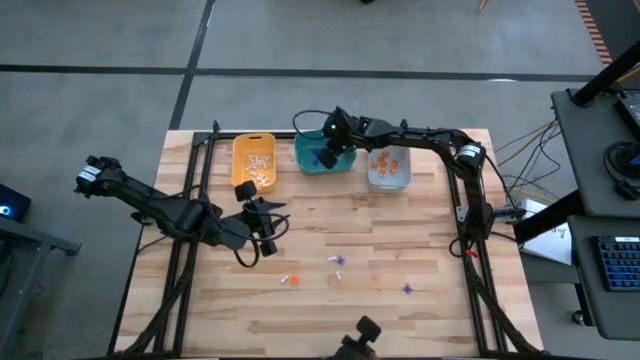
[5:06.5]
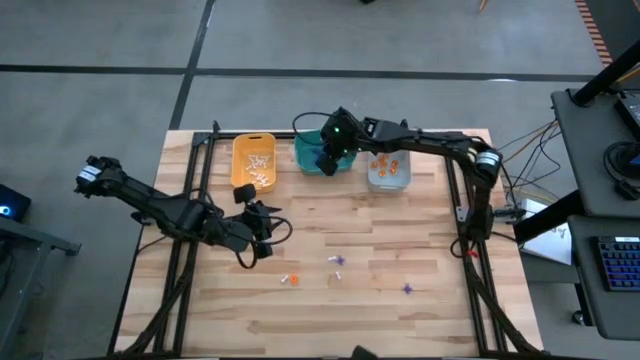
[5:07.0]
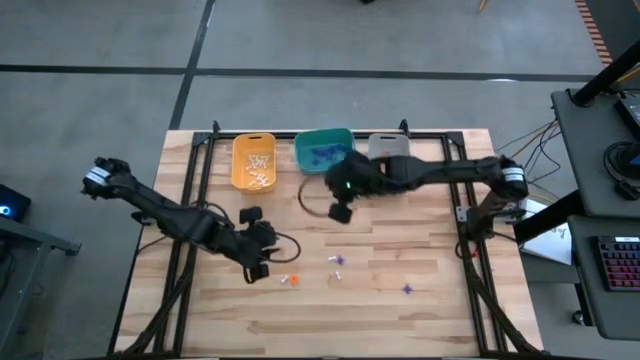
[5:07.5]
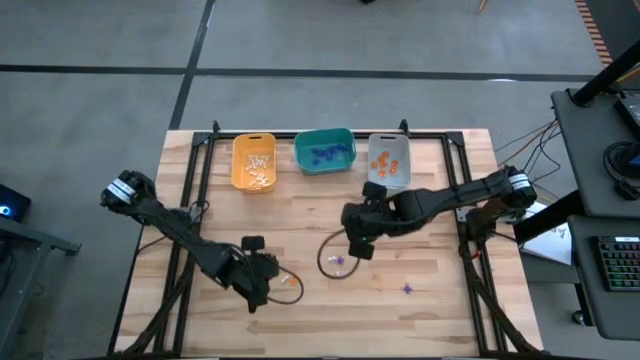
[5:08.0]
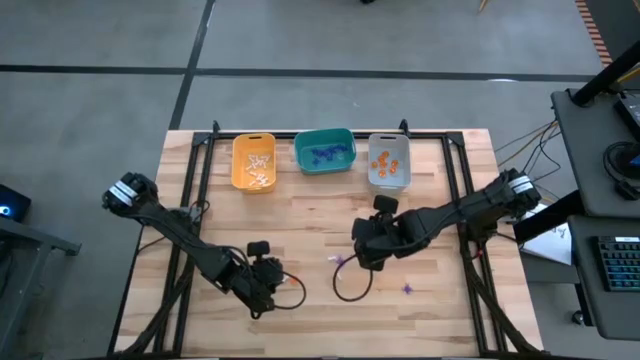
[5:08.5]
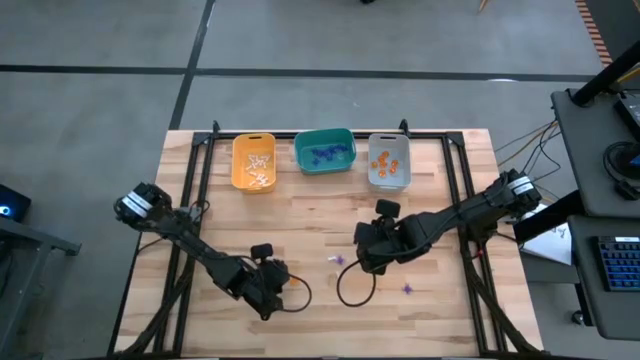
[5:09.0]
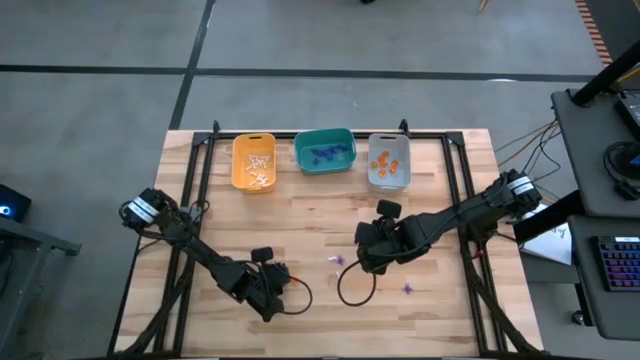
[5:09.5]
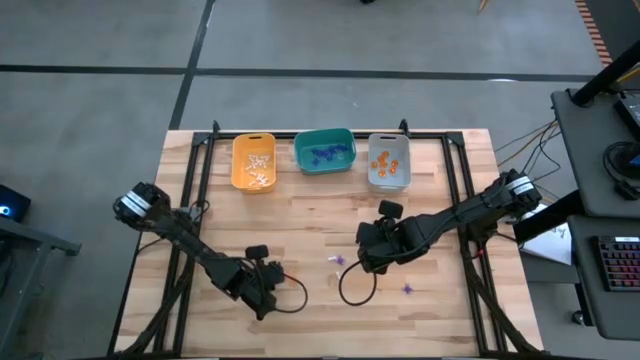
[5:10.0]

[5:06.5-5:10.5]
Task: Sort Halloween decoration
Put the white bone toy into the yellow bin

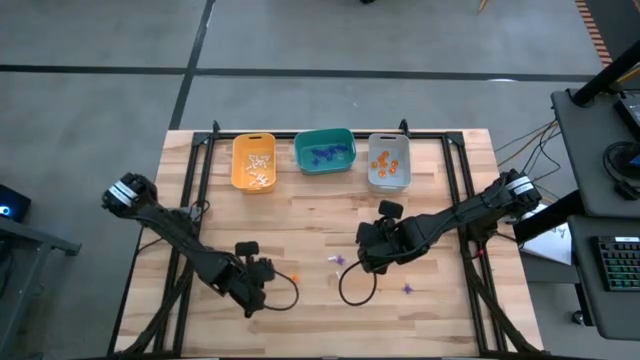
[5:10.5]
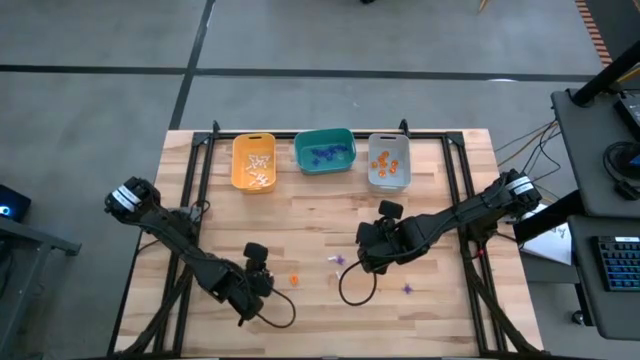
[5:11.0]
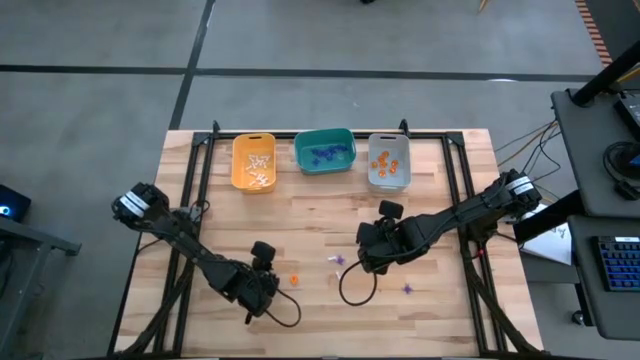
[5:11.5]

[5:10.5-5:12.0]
Put the white bone toy into the yellow bin

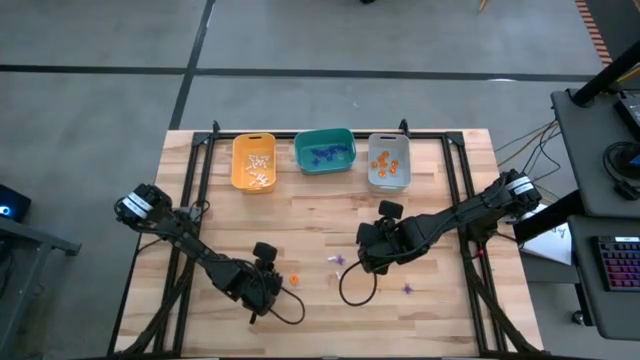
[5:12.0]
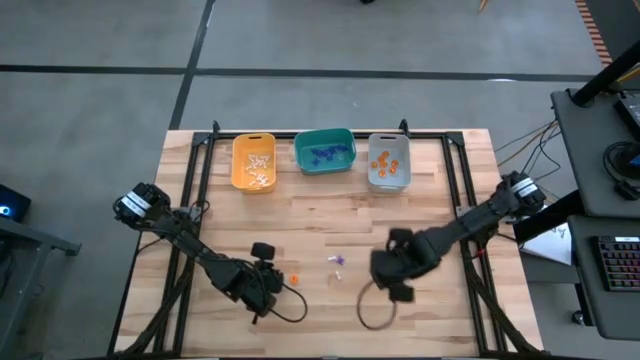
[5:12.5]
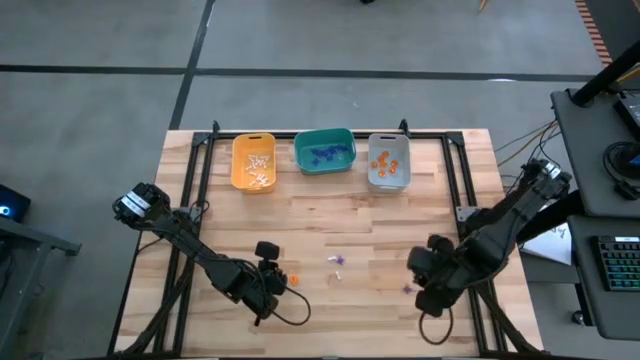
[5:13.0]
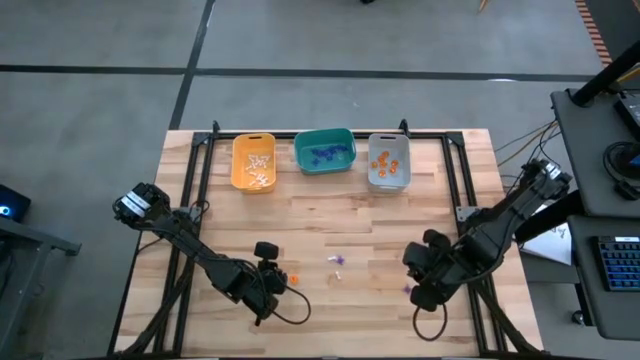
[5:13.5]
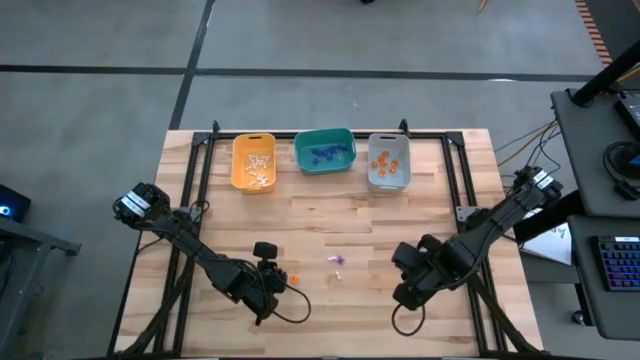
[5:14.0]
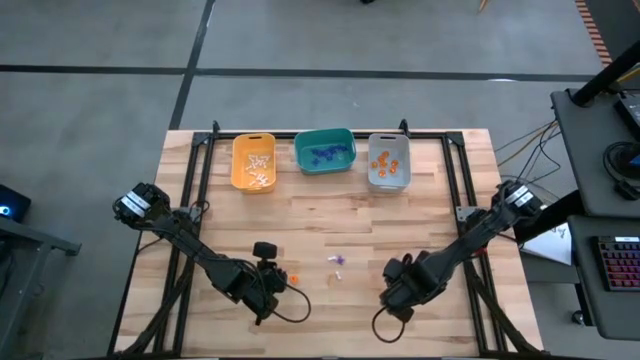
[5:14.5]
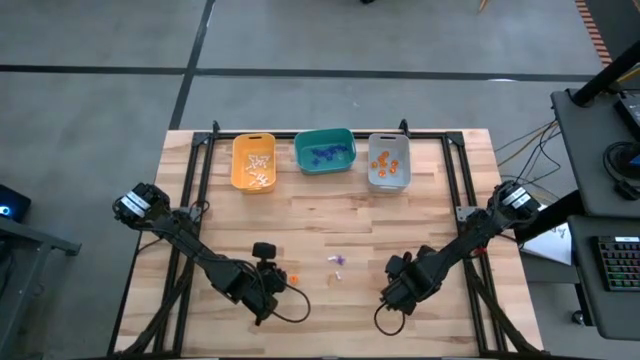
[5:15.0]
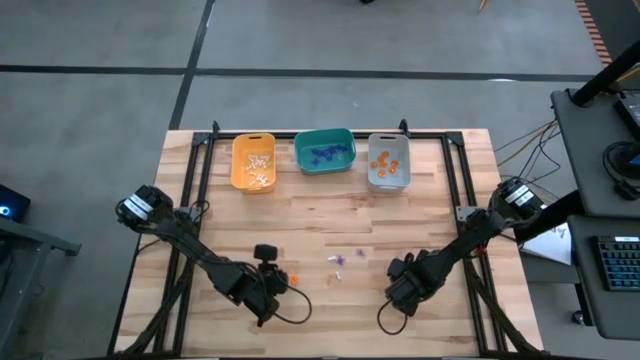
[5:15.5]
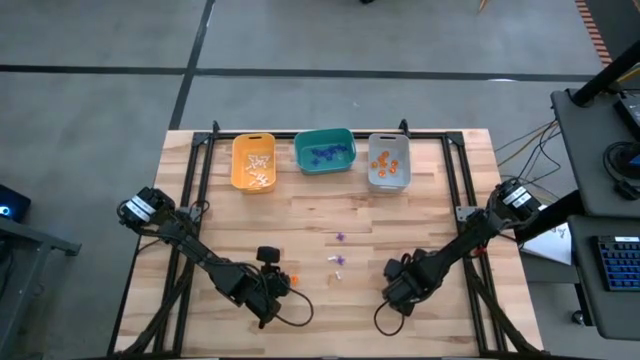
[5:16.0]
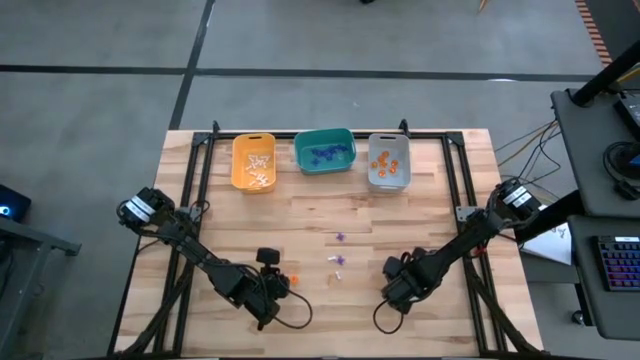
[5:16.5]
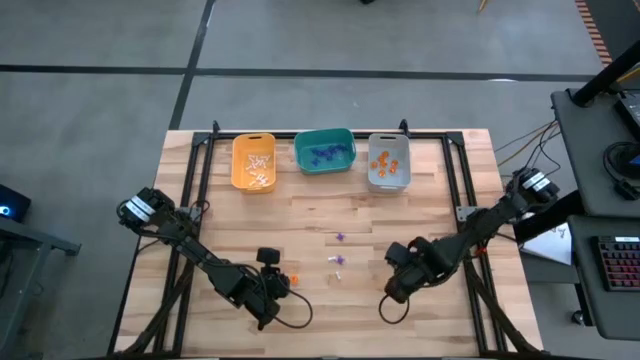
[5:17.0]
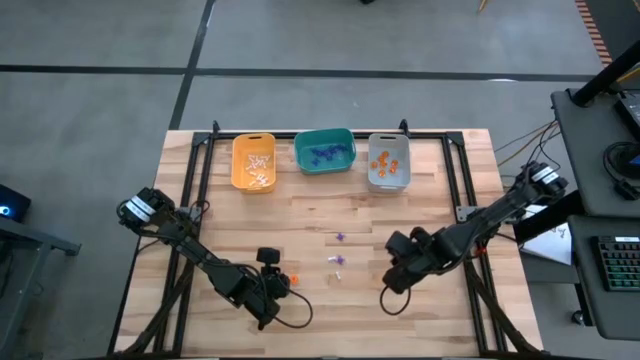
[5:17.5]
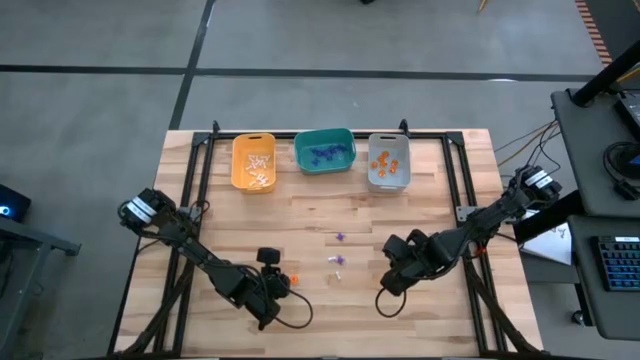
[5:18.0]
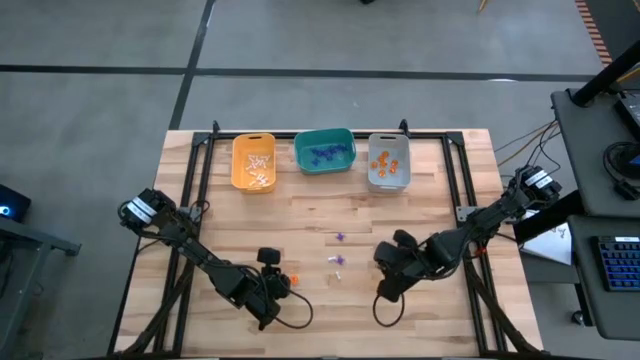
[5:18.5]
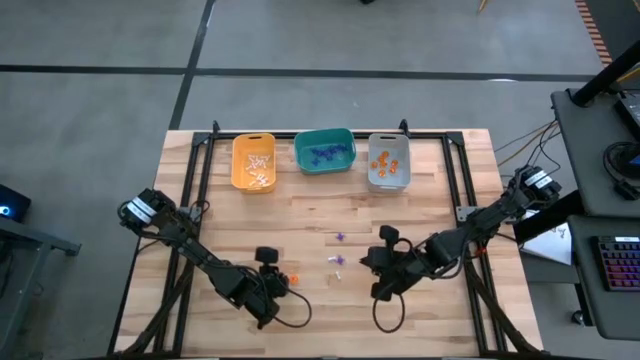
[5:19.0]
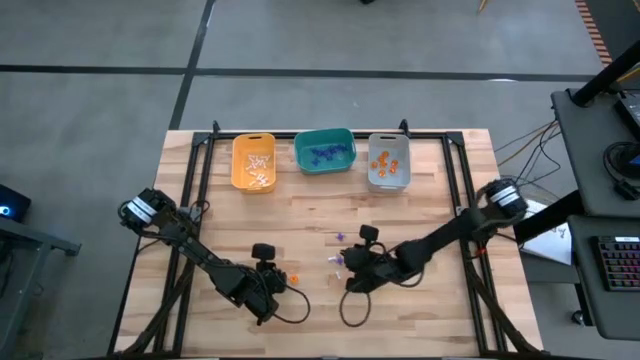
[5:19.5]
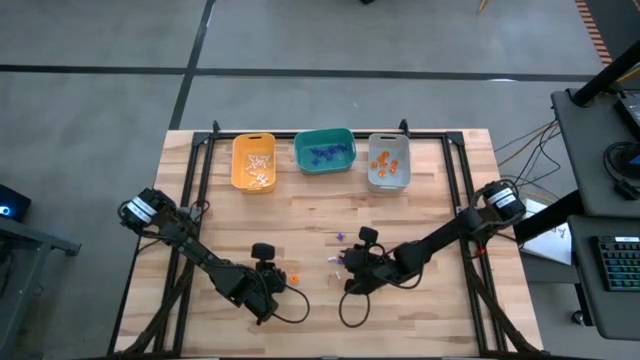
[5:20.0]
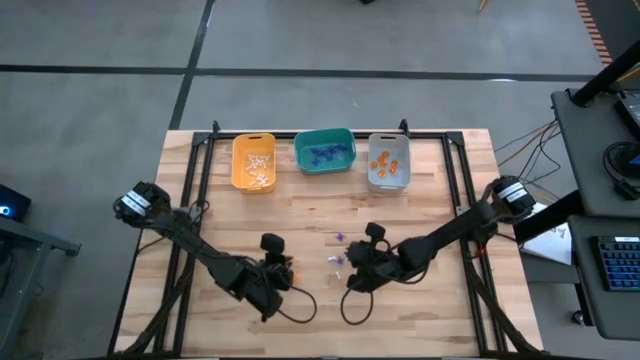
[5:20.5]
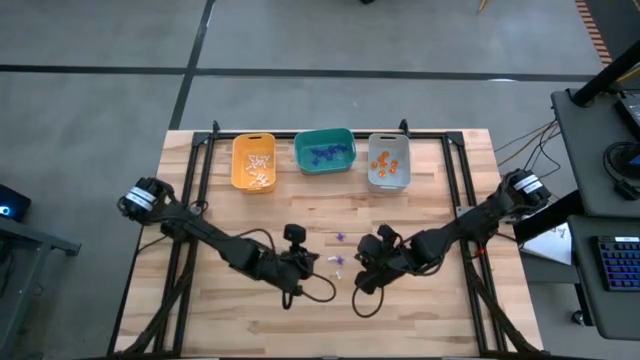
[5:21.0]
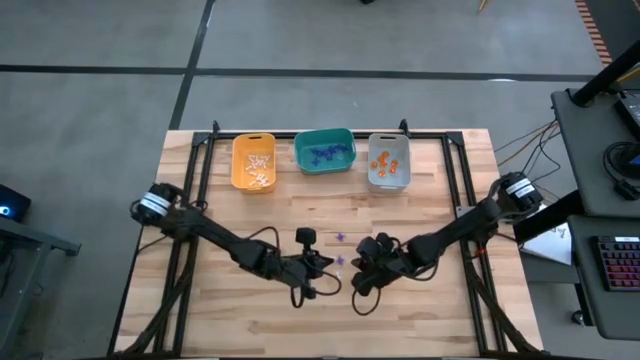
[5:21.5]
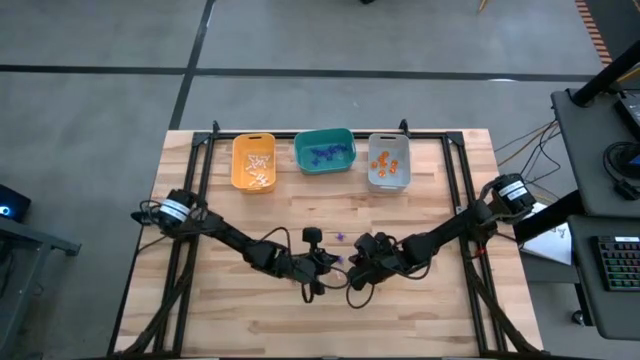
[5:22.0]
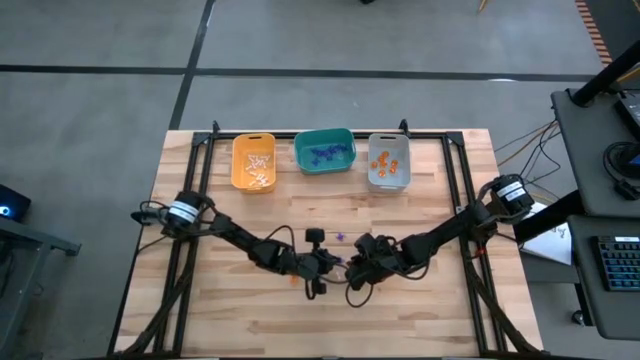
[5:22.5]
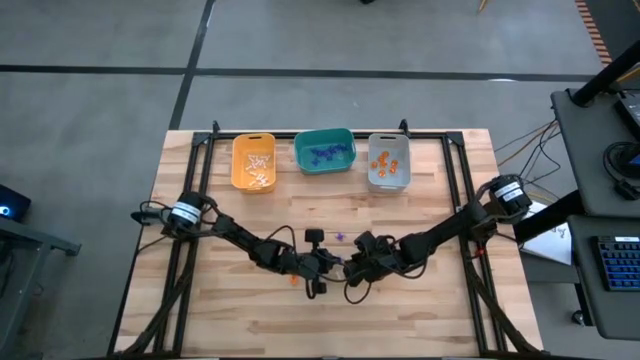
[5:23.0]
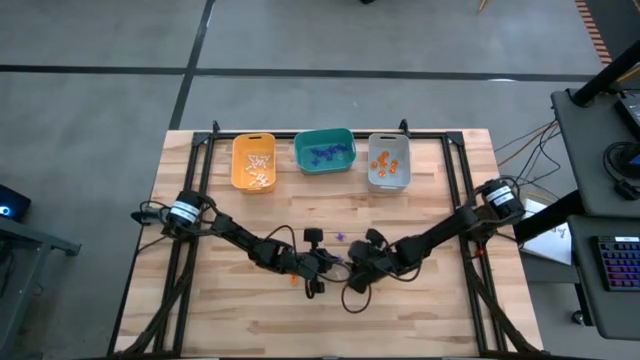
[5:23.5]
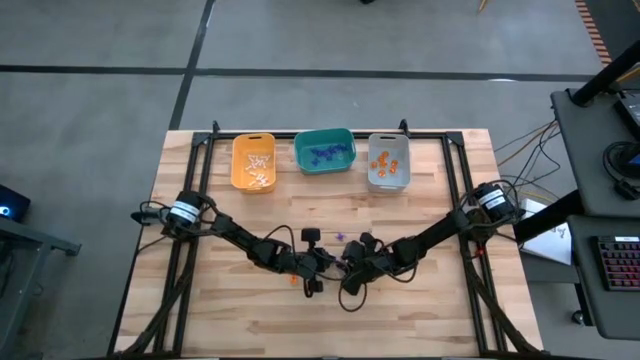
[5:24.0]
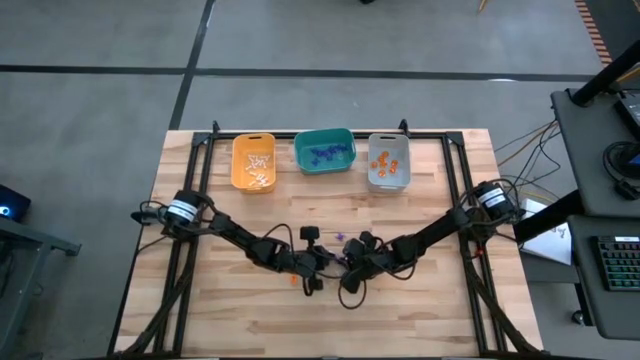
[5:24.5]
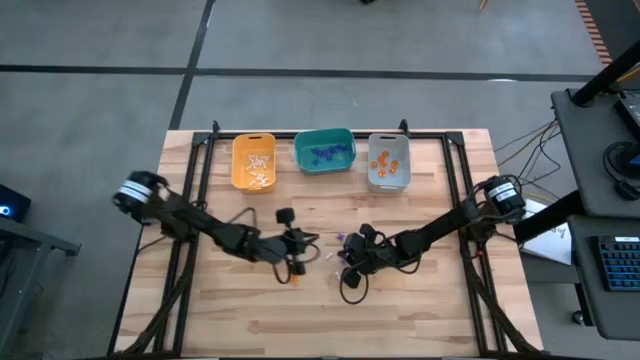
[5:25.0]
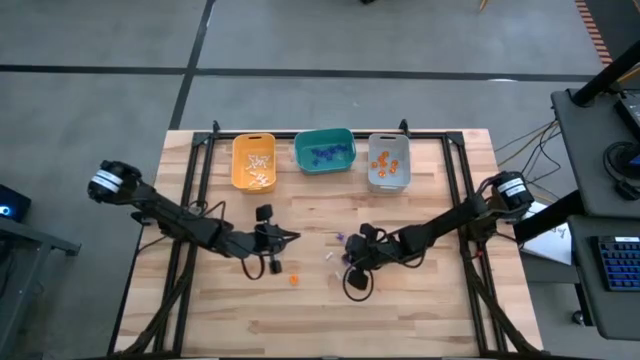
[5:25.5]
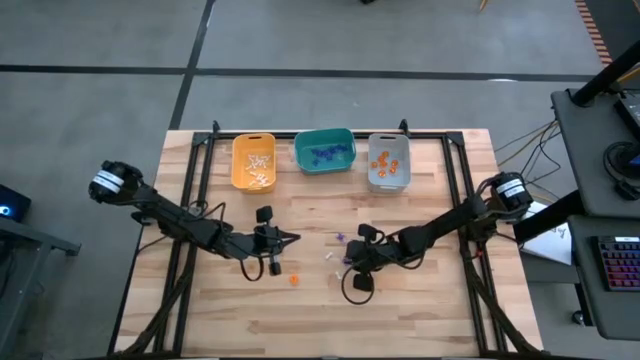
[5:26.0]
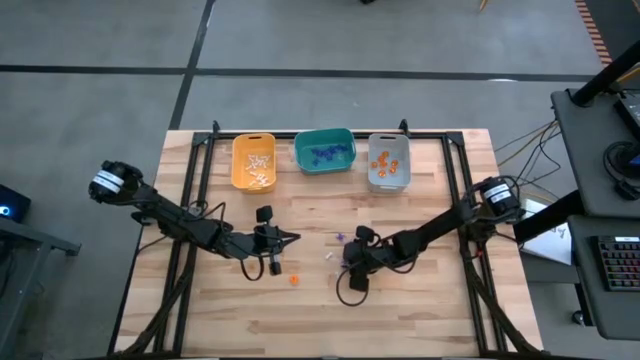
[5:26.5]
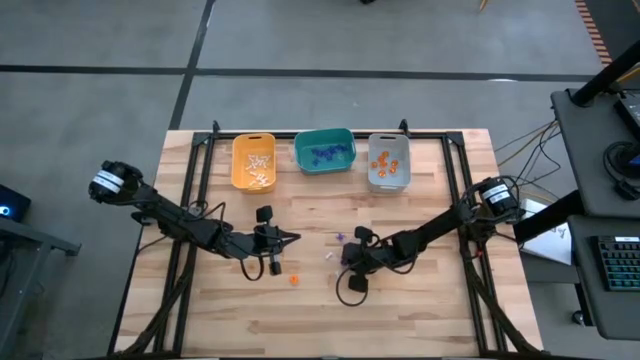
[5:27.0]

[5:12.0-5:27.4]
Put the violet spider toy into the green bin
